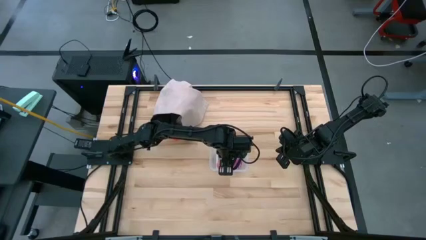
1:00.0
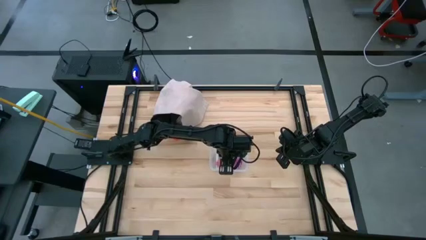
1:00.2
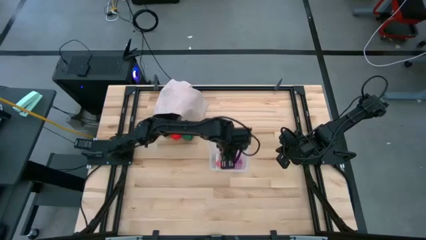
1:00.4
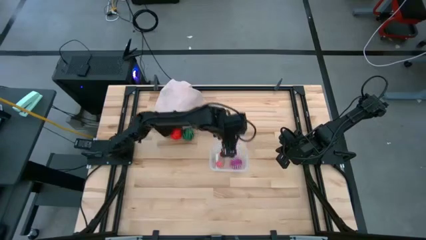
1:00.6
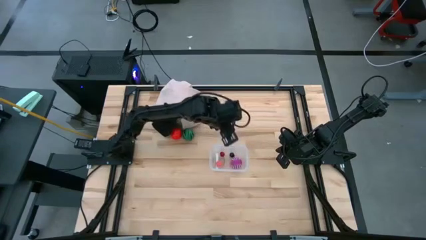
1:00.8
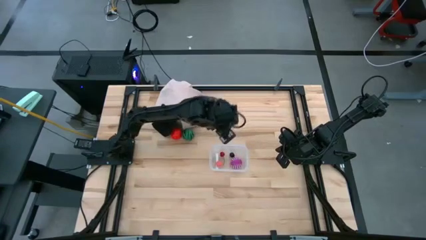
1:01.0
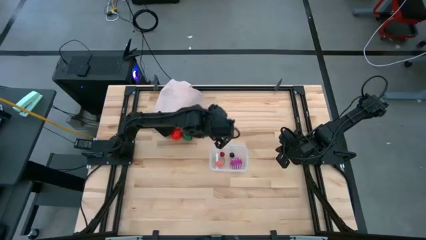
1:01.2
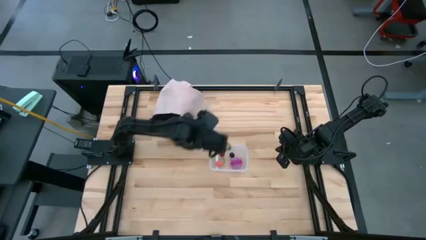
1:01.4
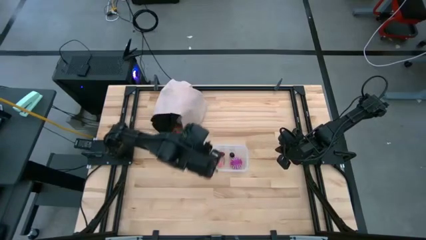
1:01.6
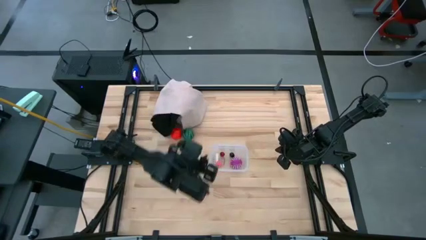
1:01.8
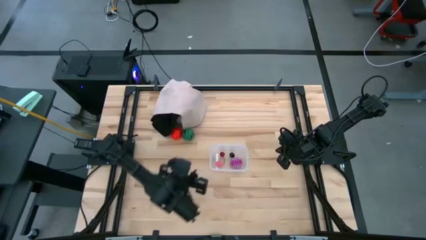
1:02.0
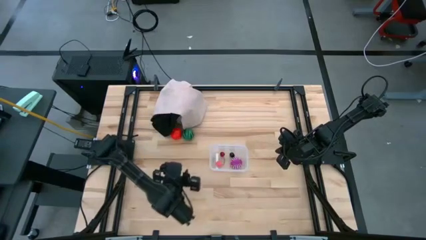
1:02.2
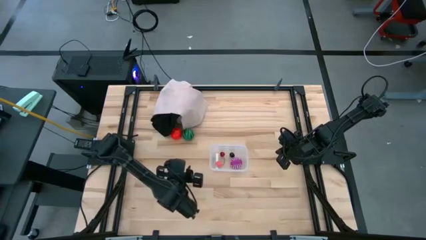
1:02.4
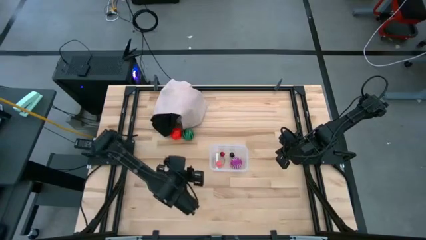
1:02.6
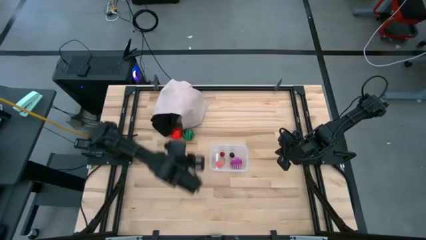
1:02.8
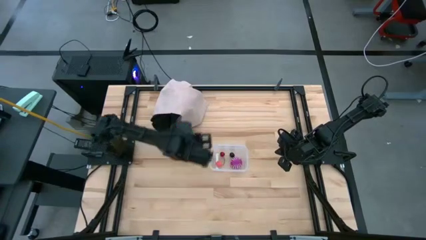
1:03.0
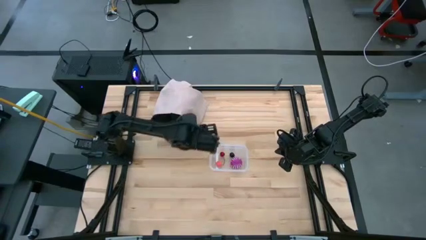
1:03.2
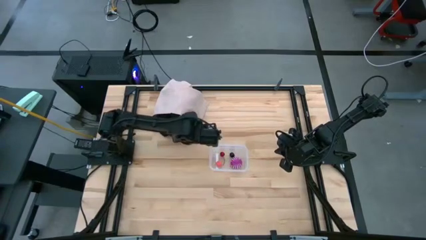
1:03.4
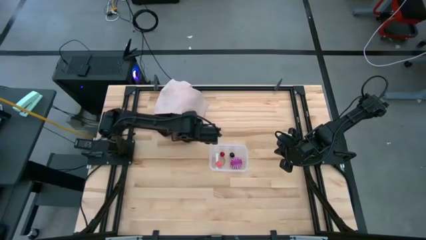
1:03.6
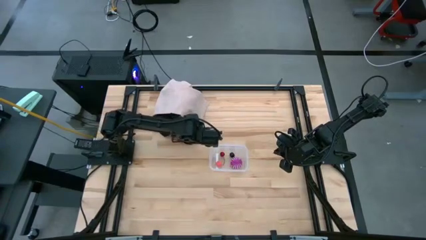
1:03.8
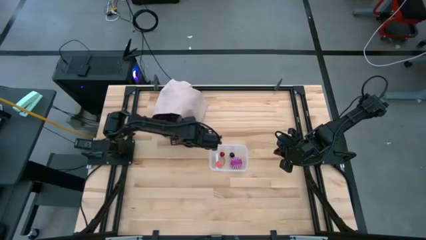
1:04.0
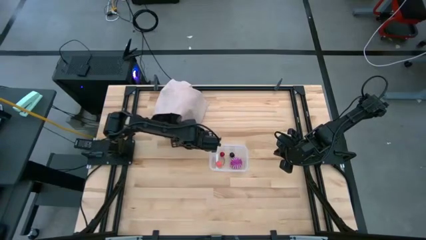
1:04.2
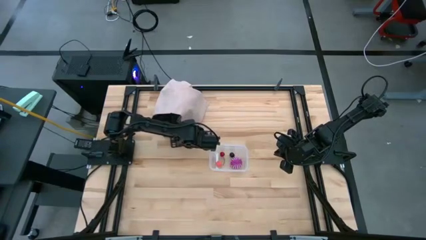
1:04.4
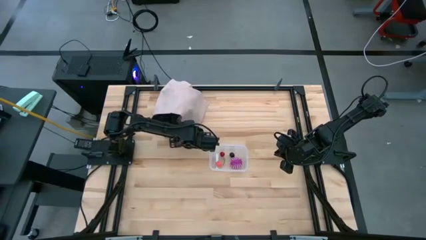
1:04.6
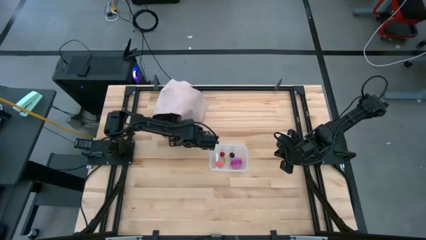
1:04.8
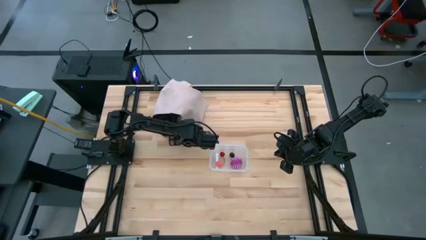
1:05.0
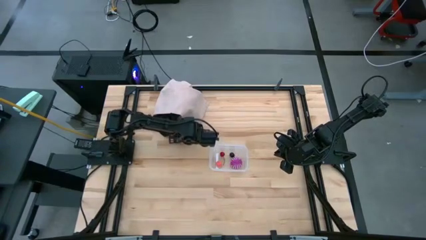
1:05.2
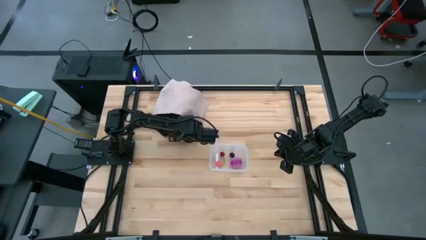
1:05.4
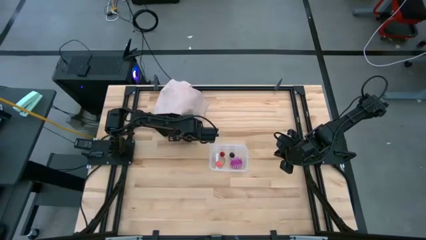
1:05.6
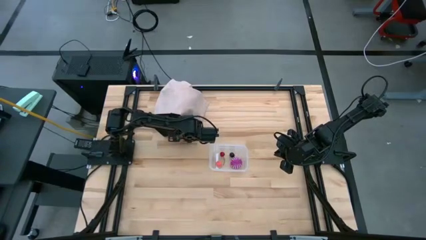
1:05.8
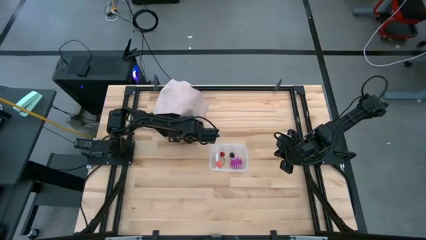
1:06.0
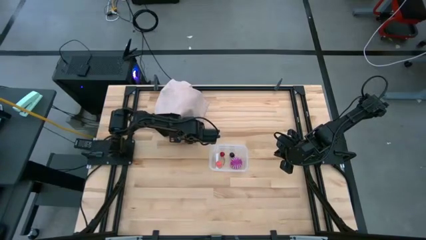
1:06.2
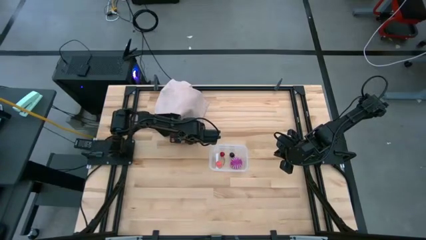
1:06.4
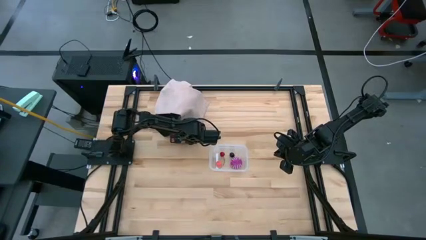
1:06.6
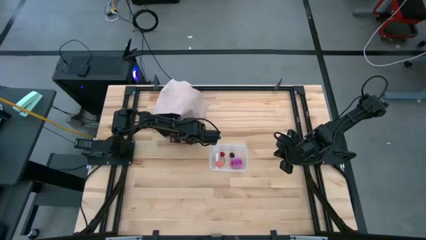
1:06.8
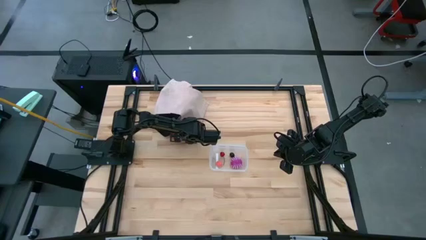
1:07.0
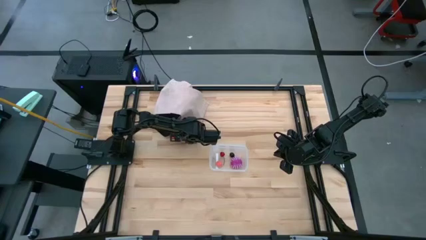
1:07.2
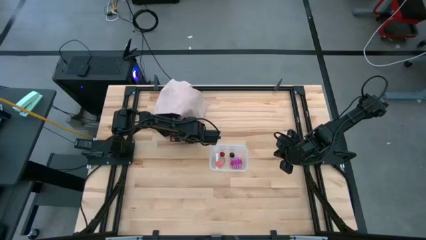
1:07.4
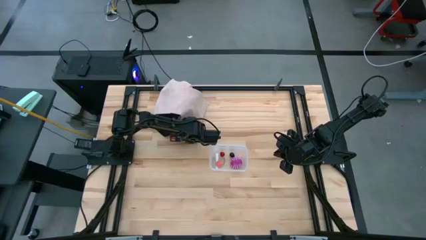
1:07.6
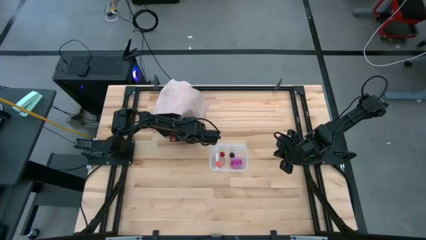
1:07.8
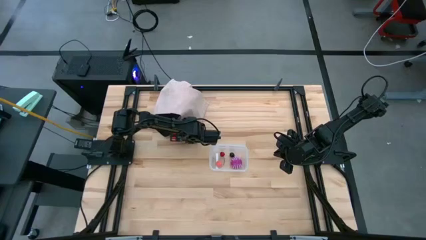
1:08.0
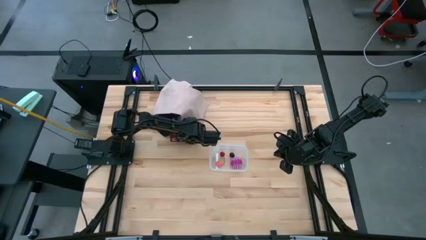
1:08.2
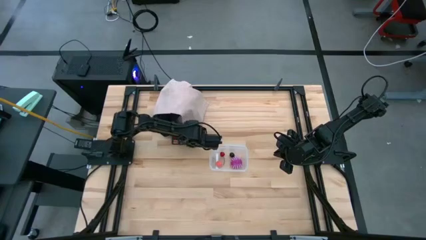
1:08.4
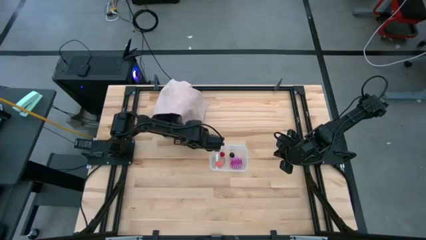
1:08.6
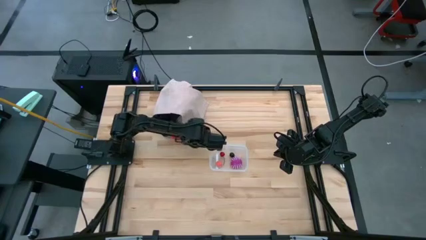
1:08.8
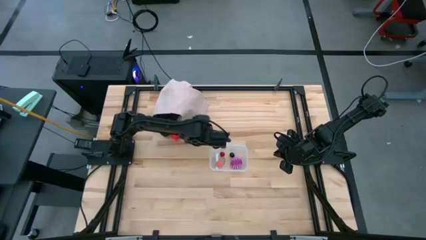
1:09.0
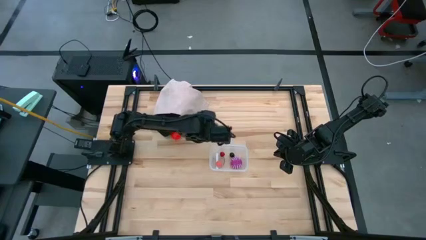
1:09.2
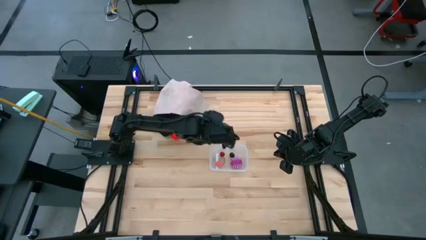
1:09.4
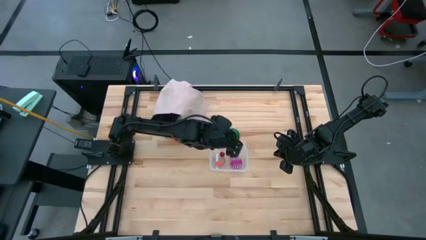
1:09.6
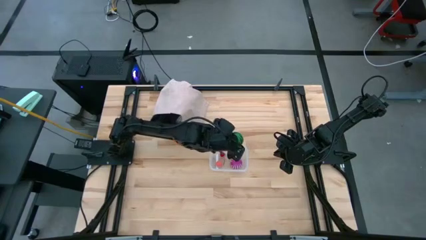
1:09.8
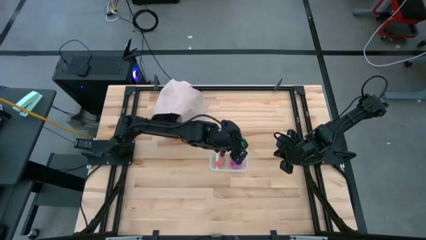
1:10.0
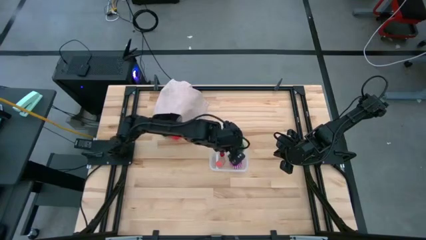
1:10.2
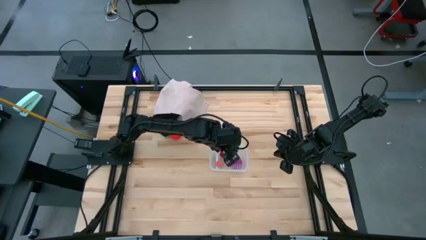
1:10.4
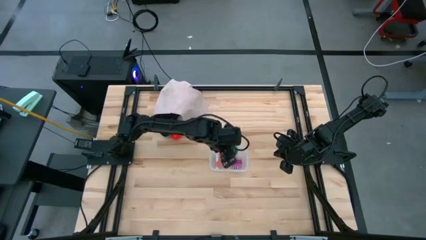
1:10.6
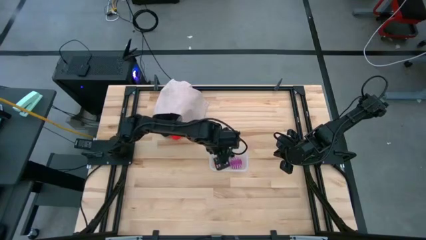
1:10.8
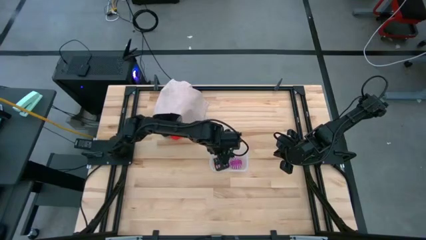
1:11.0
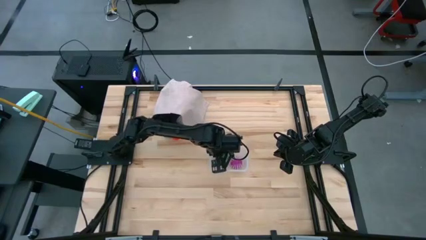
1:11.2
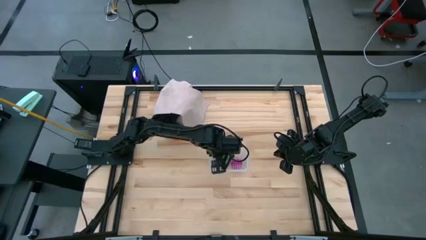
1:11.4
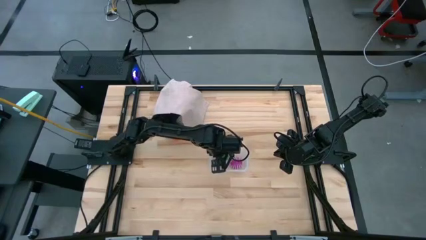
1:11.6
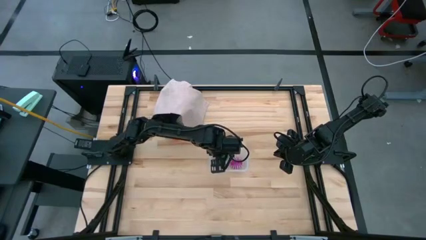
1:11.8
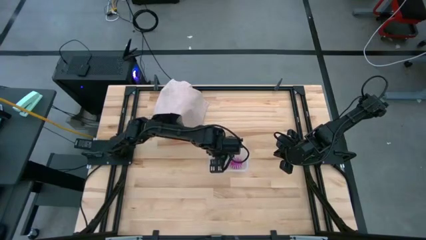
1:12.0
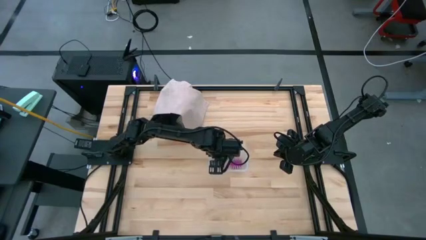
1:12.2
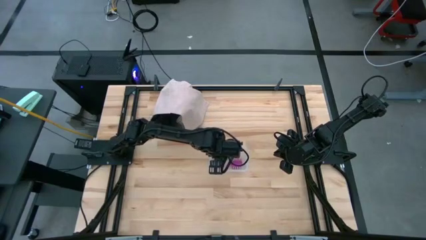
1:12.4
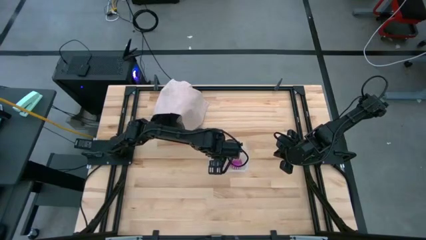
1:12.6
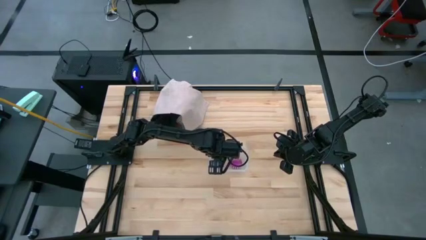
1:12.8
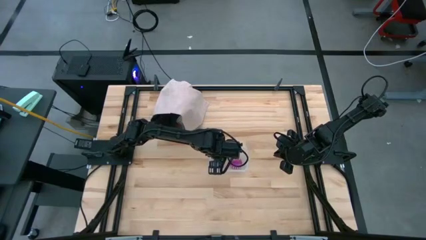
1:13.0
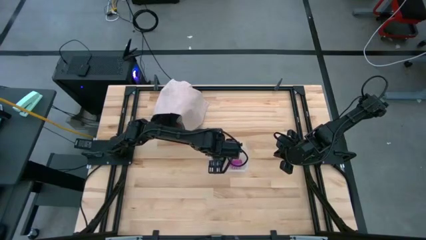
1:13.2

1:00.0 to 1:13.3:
Task: Pick and placing Produce into tupperware
Put the watermelon into the transparent bin
